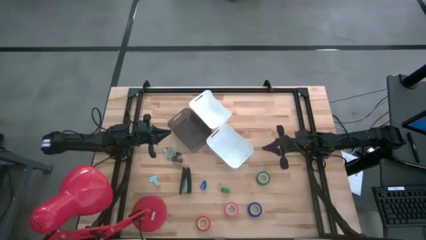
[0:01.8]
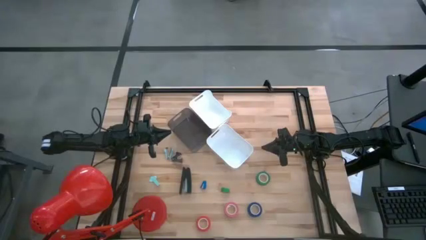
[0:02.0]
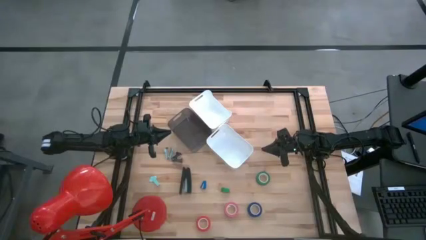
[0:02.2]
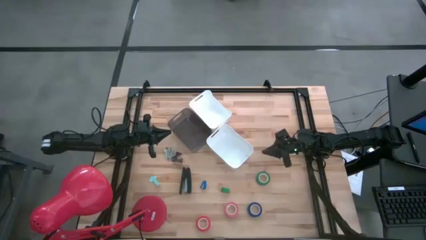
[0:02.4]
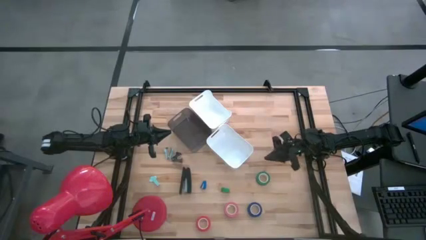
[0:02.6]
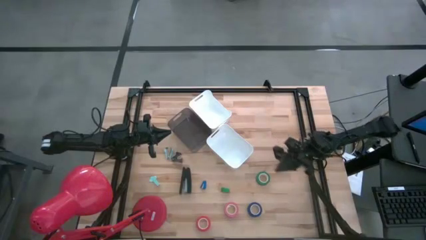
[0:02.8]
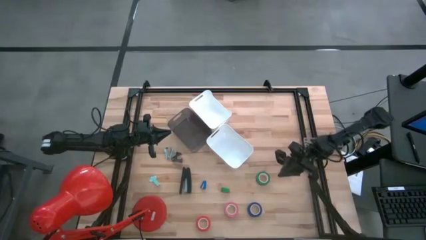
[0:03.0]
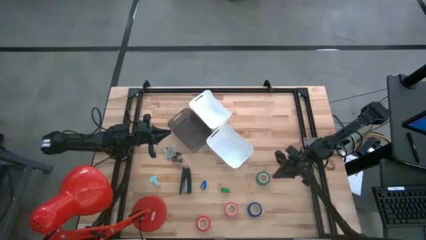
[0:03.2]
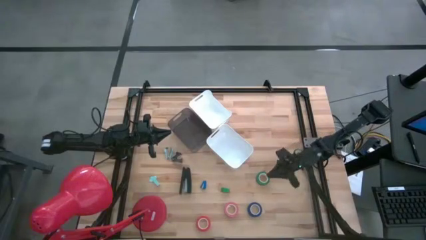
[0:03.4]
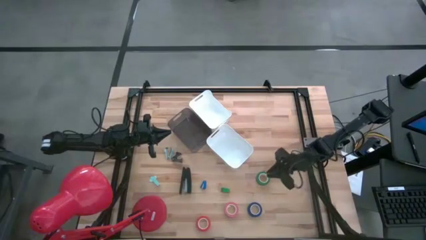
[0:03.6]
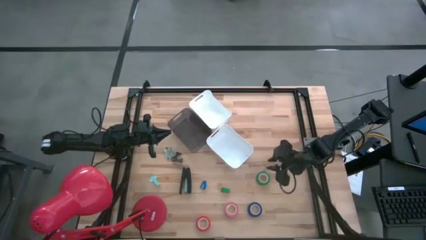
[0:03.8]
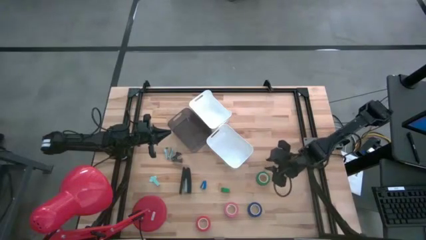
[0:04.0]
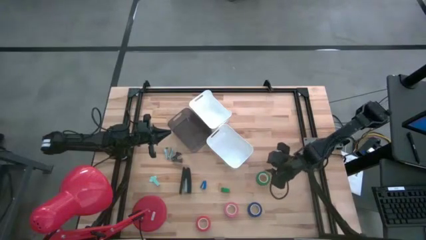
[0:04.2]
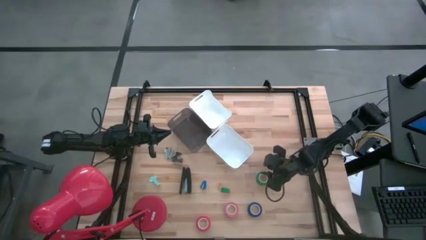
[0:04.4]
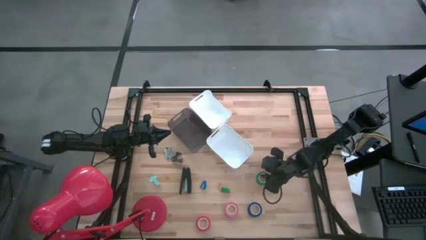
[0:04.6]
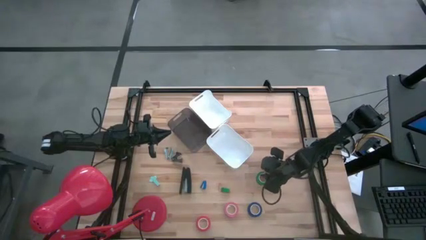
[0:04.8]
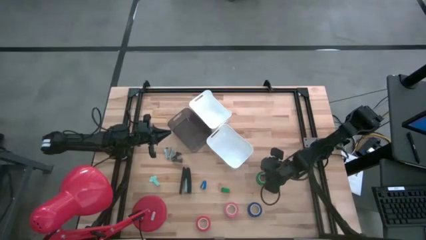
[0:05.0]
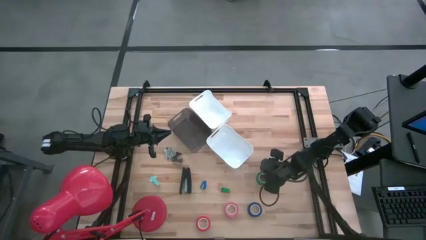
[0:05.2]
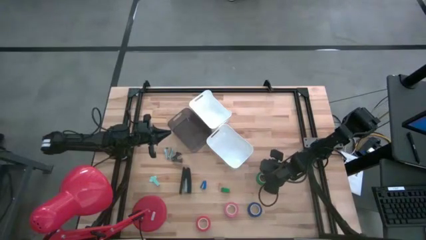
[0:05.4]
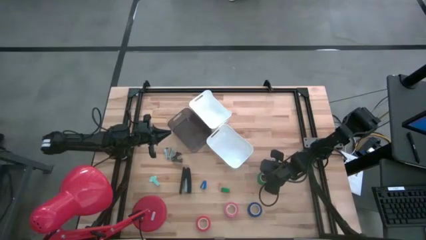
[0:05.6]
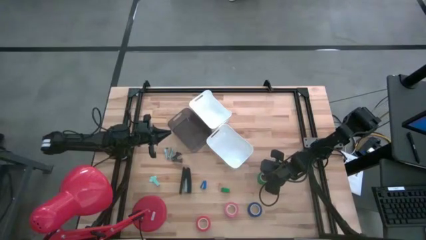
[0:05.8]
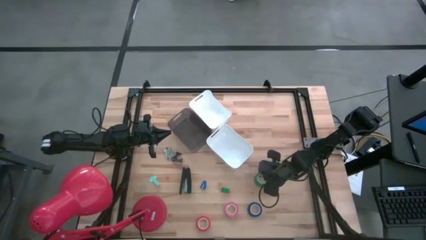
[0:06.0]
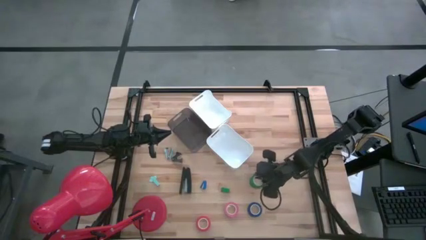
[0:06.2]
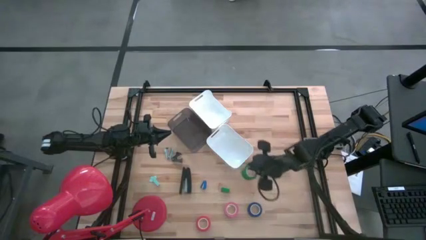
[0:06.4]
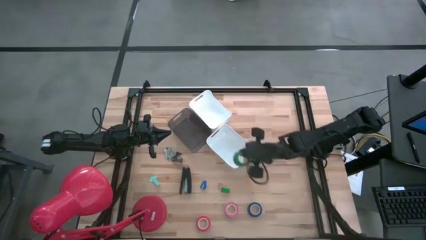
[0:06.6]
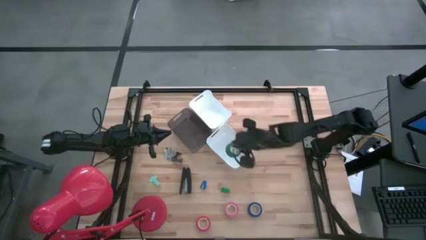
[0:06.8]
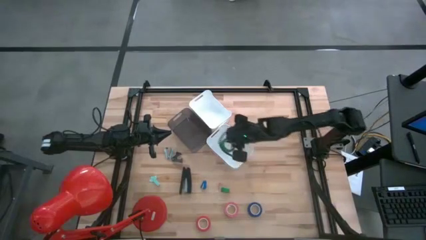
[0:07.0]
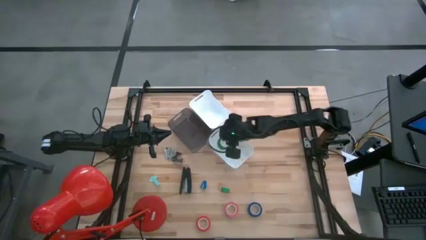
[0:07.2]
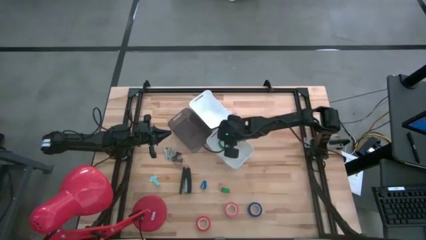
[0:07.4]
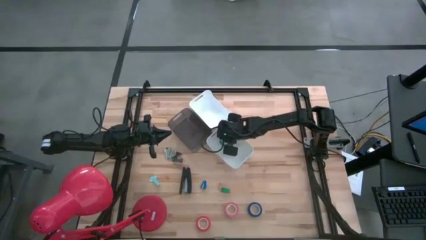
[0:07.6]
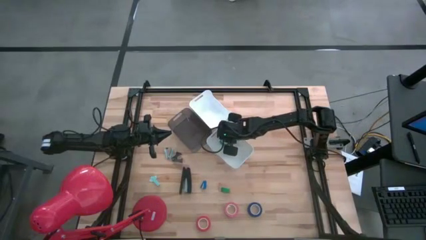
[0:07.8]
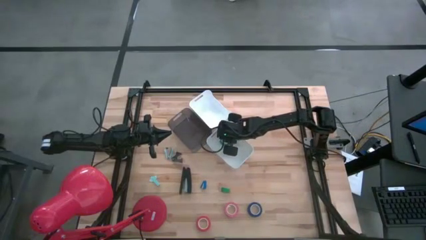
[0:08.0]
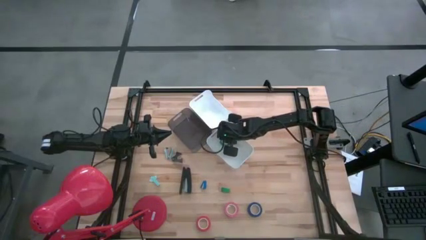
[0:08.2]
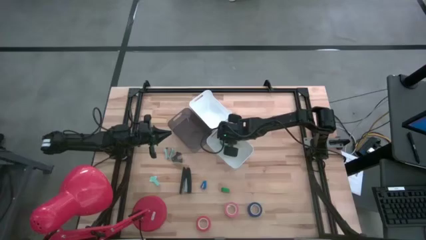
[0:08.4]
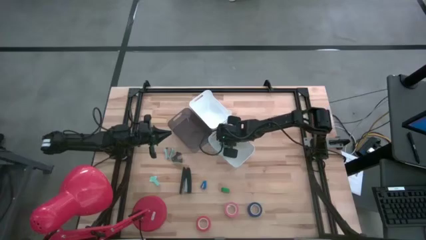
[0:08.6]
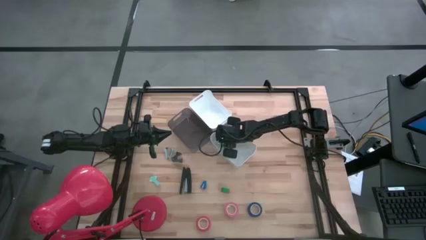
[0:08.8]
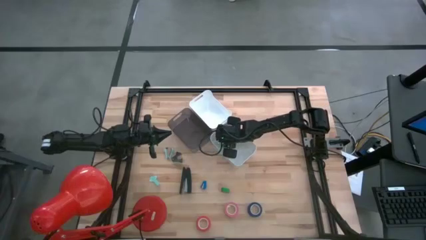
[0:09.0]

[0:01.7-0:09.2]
Task: Pick and place Stapler, Stapler remover, tape
Put the green tape into the bottom white bin

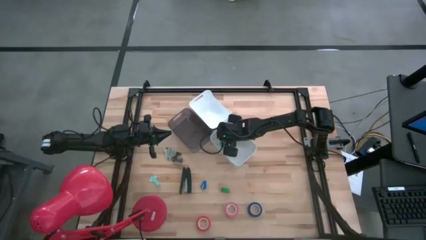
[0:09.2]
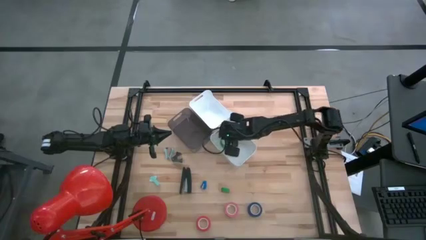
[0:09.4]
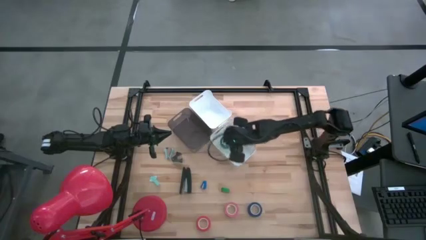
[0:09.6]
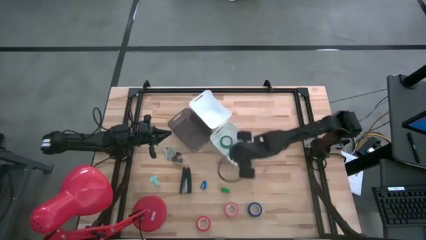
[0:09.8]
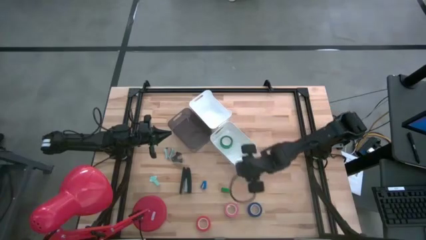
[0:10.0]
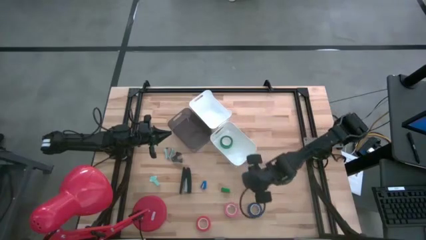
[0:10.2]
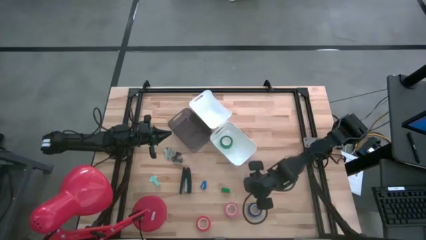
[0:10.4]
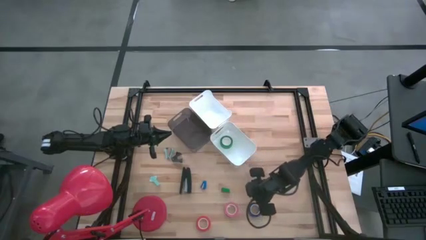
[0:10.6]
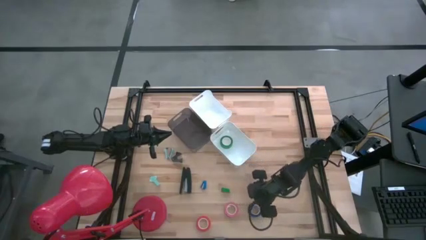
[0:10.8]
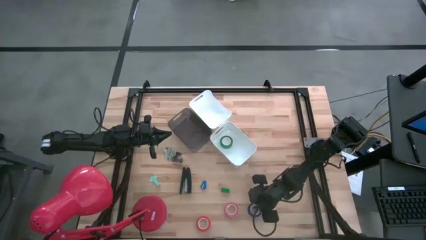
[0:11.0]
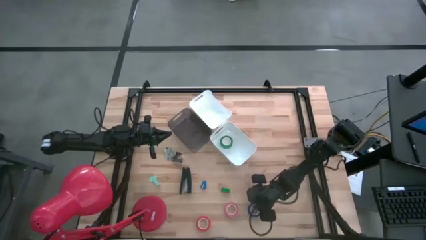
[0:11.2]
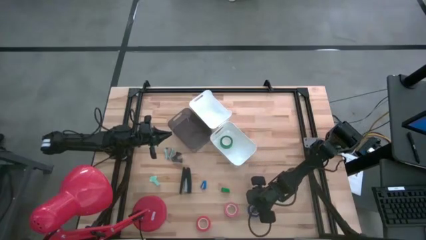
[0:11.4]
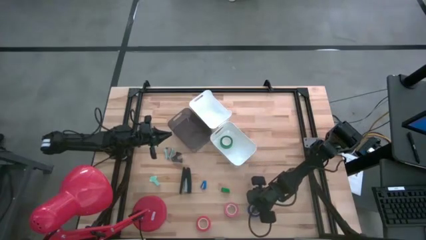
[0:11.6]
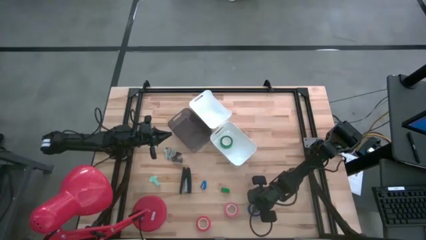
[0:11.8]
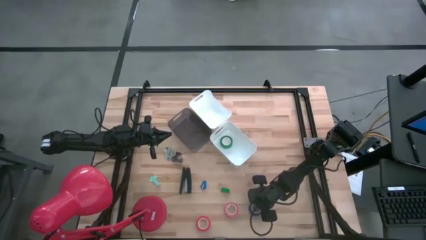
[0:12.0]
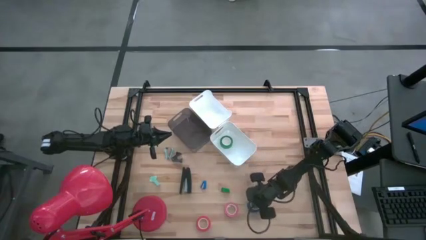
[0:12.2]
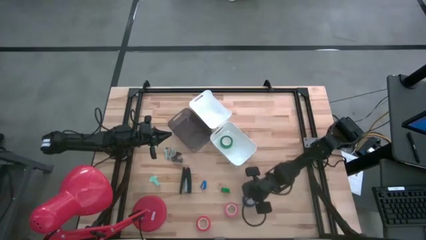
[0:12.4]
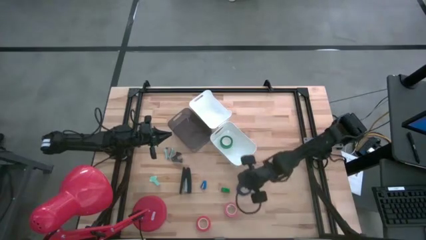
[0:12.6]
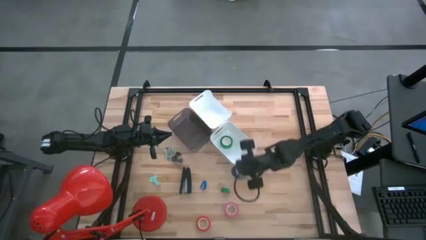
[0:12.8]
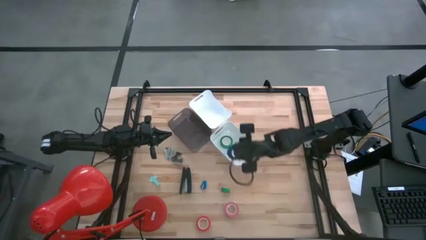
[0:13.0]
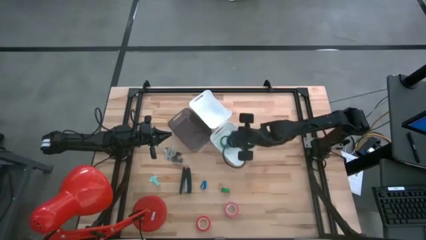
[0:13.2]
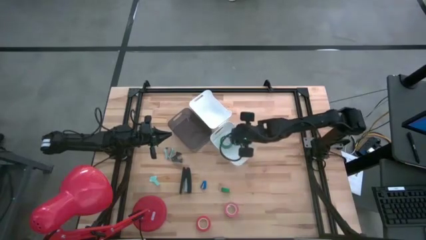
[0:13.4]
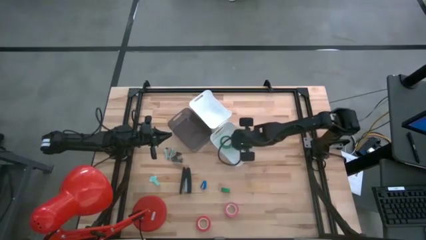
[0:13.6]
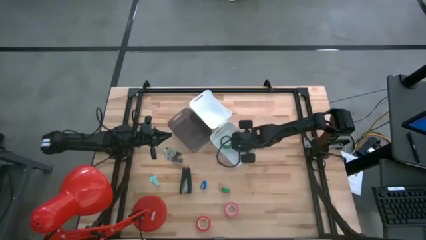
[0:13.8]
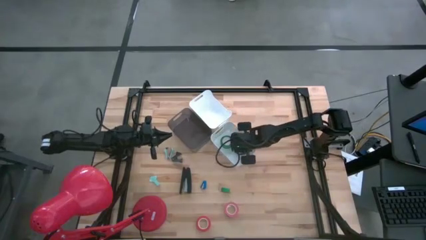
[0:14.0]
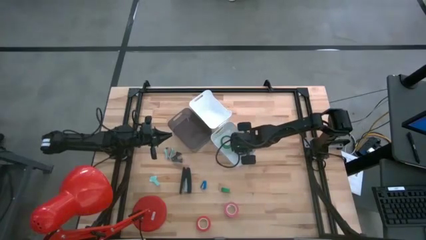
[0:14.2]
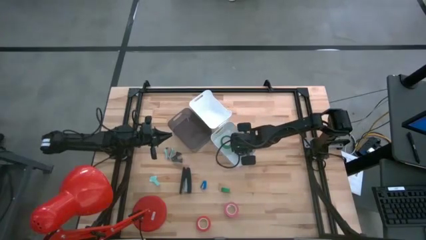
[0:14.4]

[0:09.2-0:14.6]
Put the blue tape into the bottom white bin

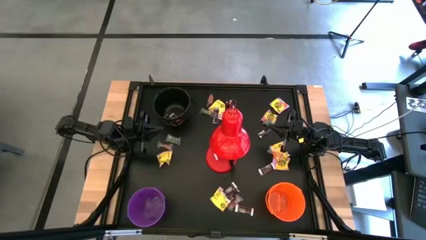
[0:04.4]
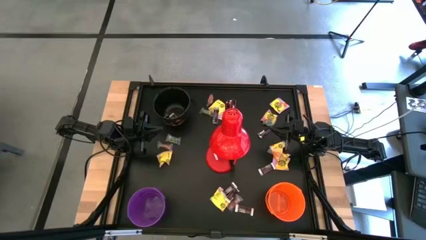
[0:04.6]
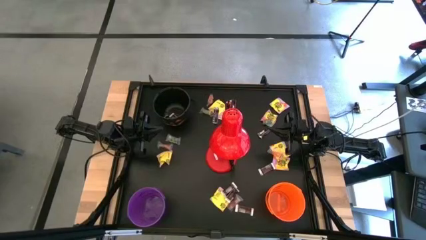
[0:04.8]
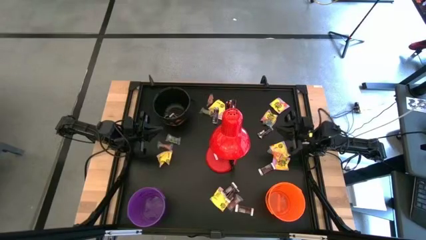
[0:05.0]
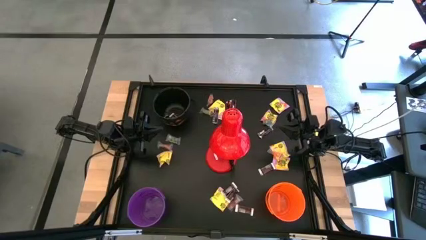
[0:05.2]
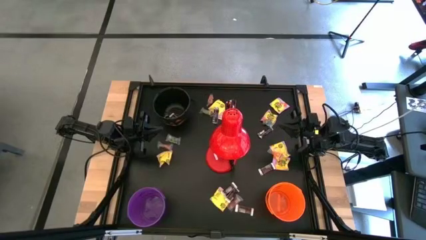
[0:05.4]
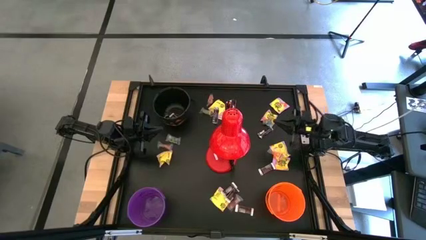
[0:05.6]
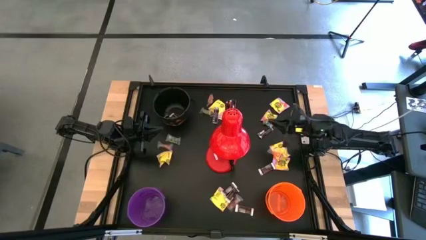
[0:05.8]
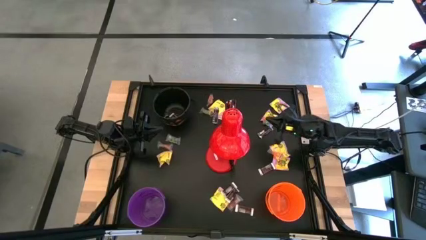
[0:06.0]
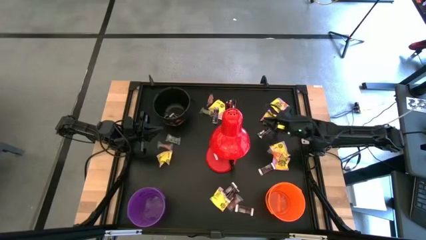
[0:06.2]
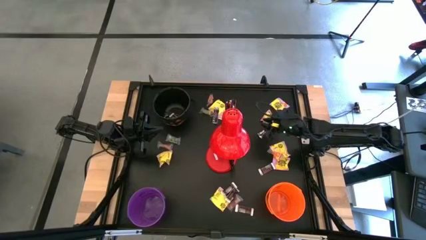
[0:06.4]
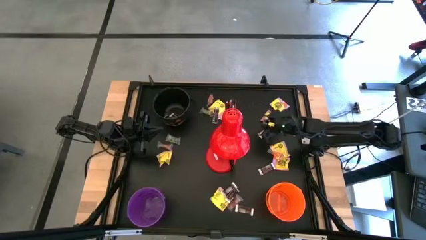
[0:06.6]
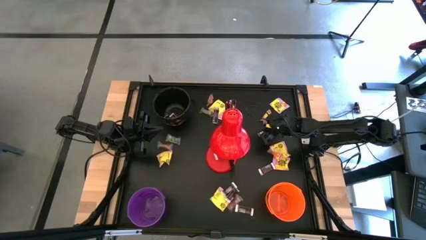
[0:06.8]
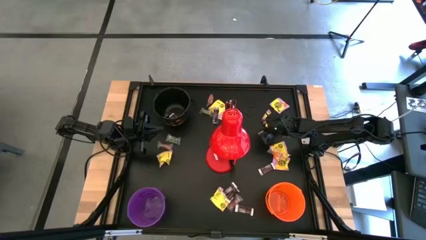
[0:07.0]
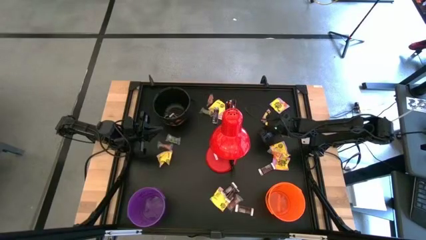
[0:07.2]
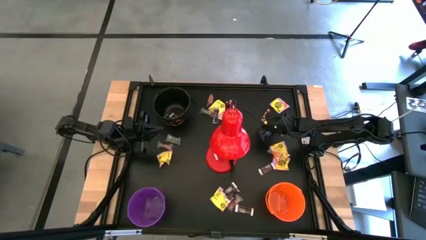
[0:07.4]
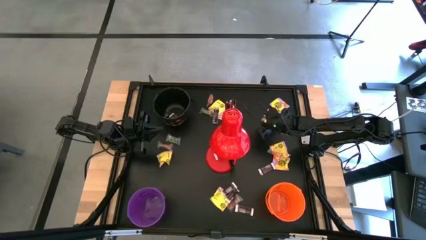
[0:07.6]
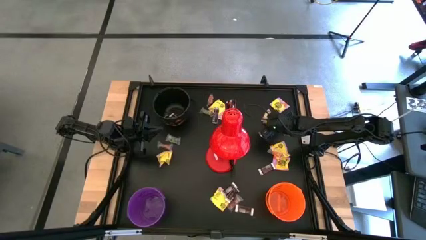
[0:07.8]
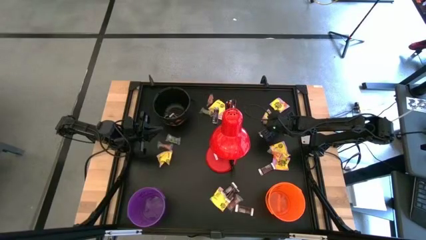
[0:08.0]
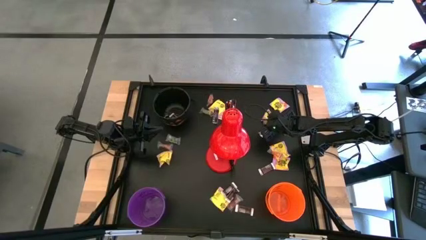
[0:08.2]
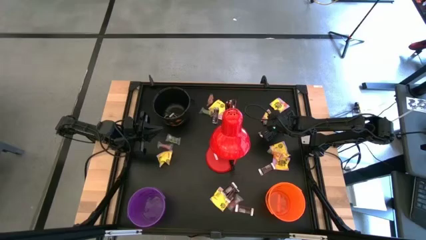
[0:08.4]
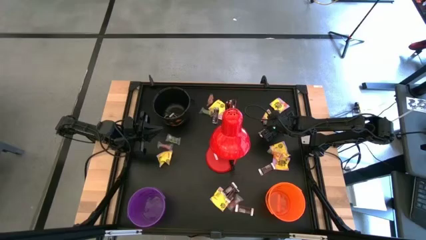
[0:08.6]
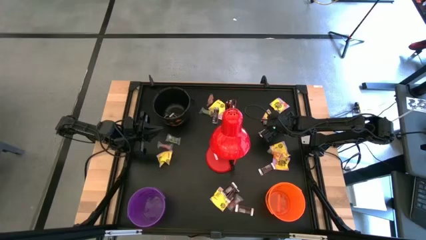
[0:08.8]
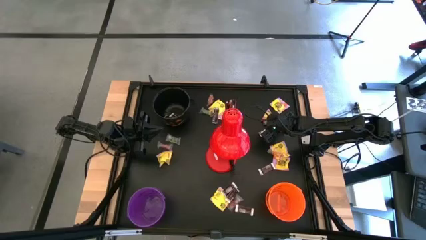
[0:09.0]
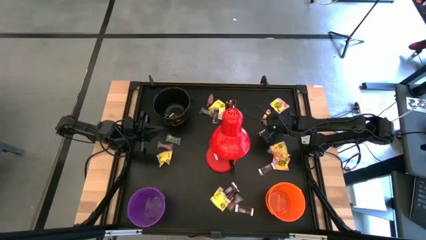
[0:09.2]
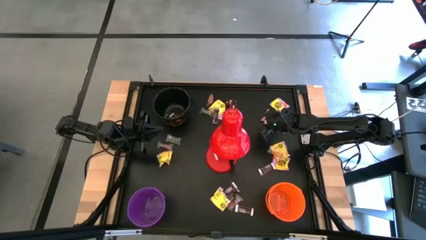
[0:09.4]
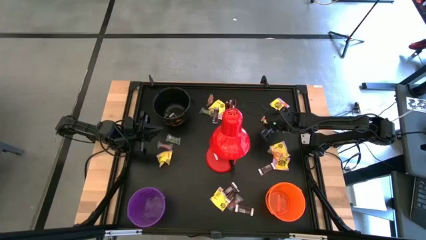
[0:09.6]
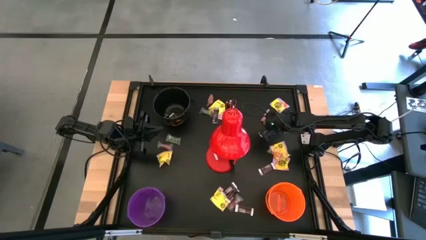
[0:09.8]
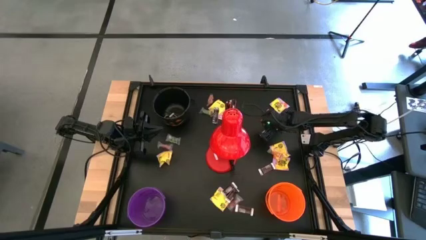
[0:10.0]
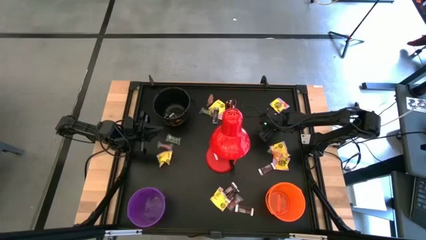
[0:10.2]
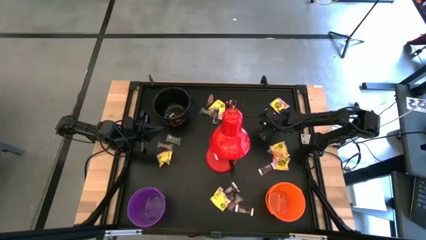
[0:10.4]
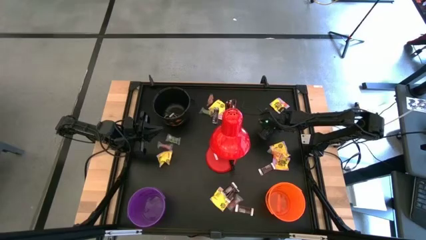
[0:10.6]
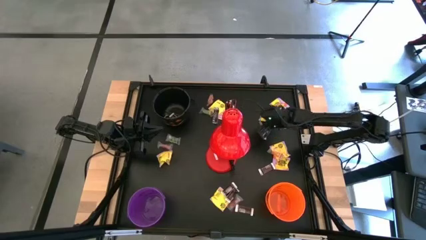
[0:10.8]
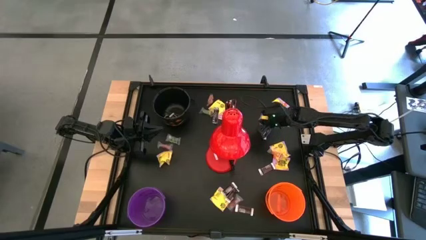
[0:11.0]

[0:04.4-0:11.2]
Task: Organize candy in baskets
Put the blue gummy into the orange bucket
